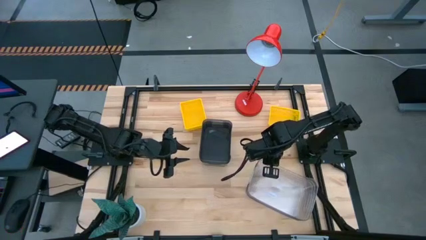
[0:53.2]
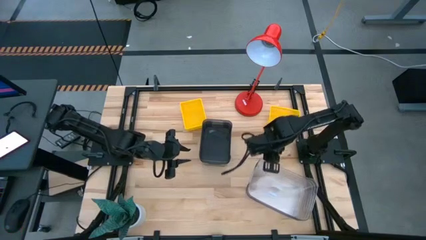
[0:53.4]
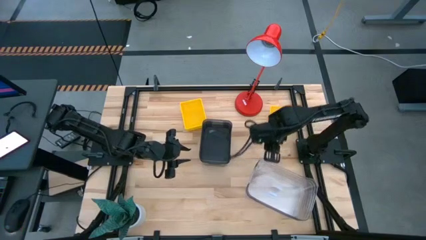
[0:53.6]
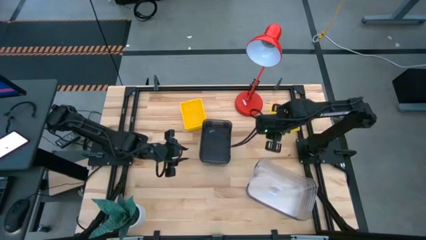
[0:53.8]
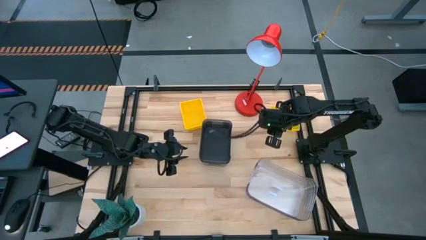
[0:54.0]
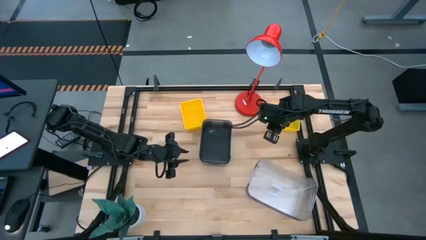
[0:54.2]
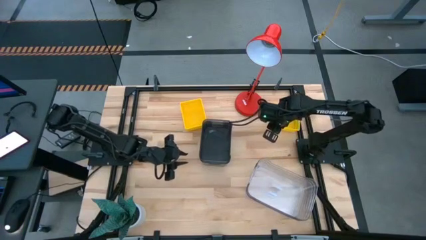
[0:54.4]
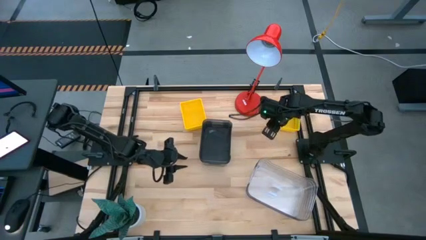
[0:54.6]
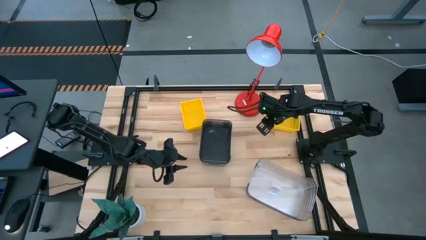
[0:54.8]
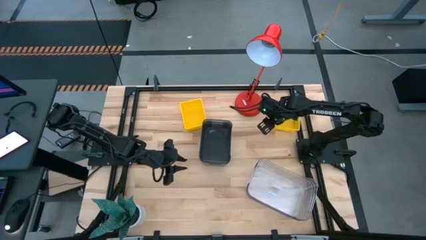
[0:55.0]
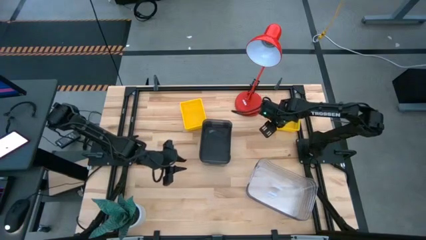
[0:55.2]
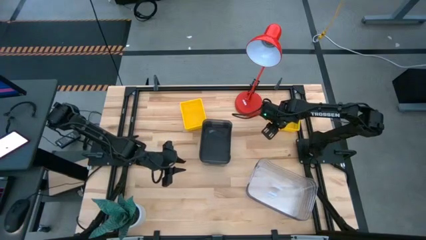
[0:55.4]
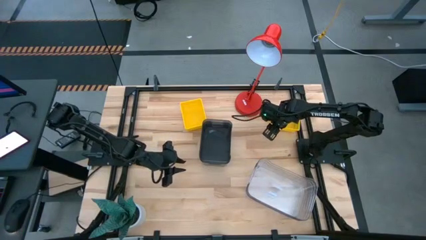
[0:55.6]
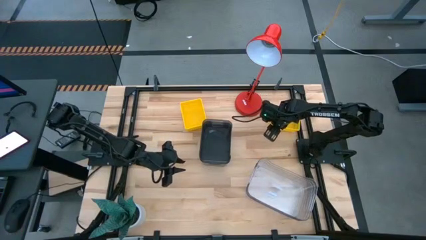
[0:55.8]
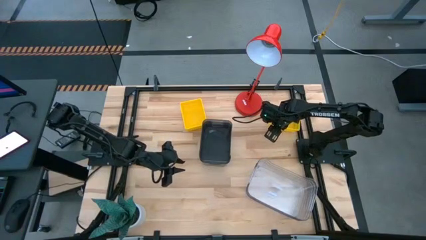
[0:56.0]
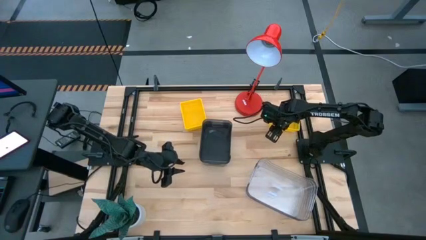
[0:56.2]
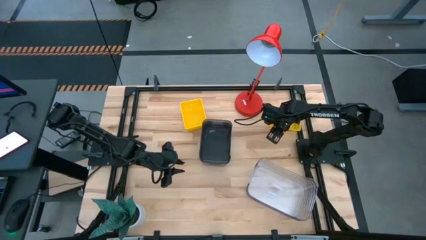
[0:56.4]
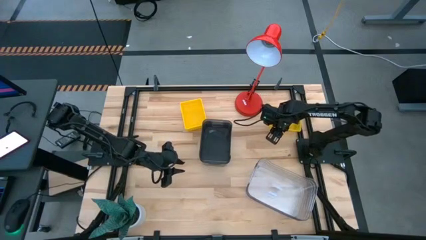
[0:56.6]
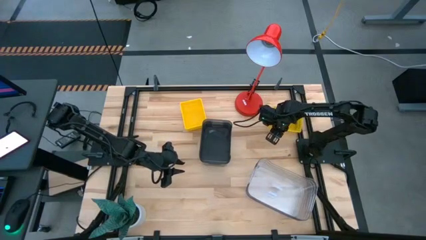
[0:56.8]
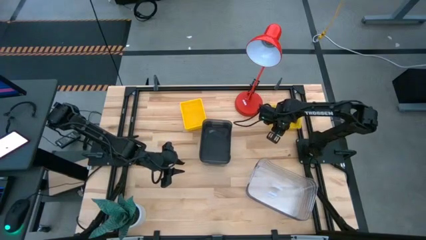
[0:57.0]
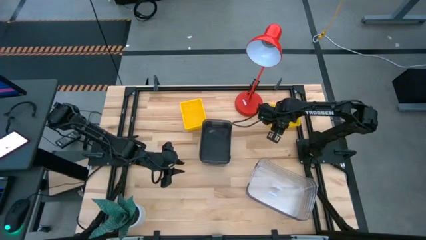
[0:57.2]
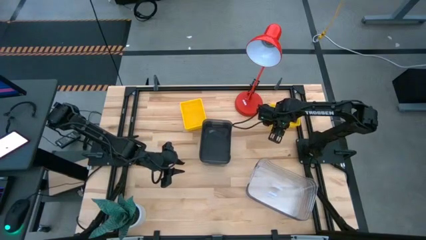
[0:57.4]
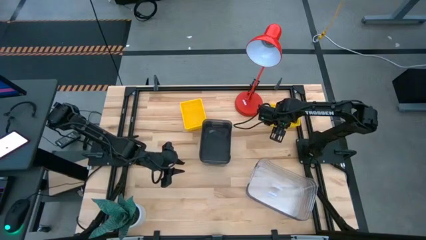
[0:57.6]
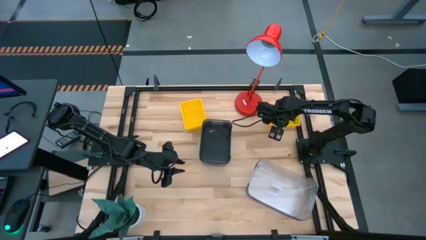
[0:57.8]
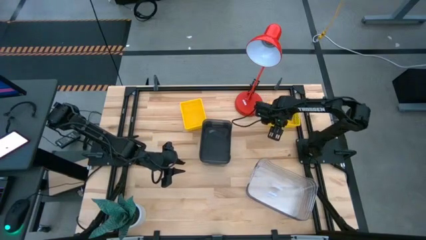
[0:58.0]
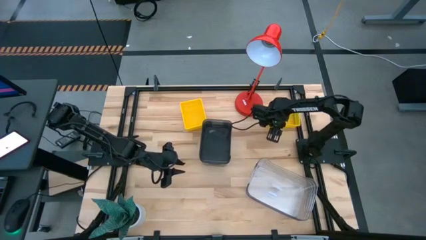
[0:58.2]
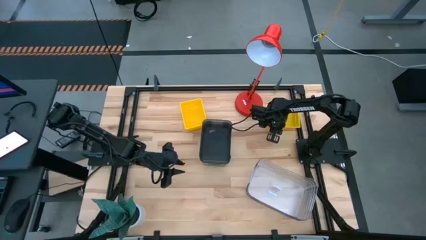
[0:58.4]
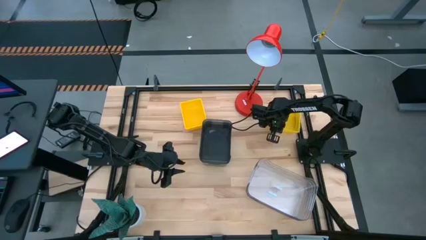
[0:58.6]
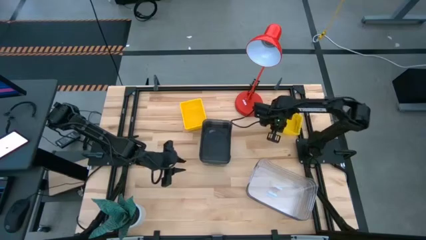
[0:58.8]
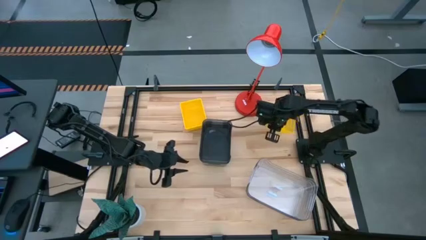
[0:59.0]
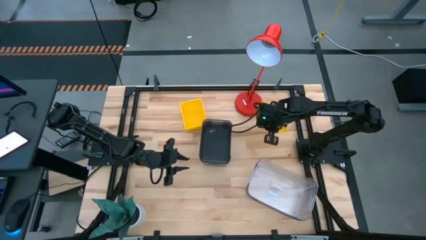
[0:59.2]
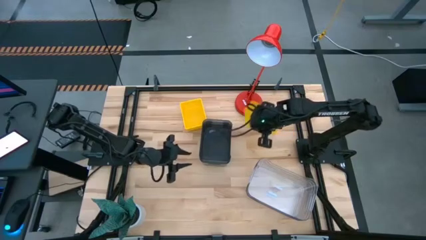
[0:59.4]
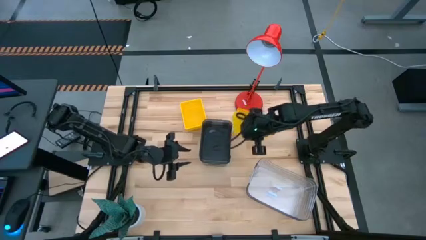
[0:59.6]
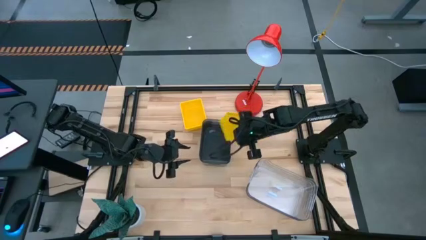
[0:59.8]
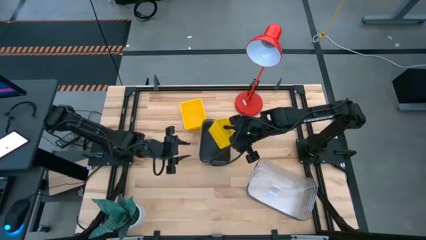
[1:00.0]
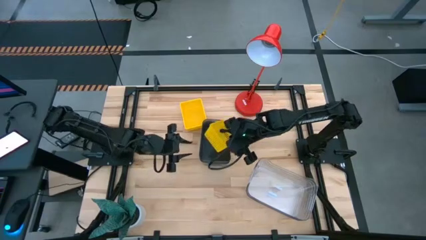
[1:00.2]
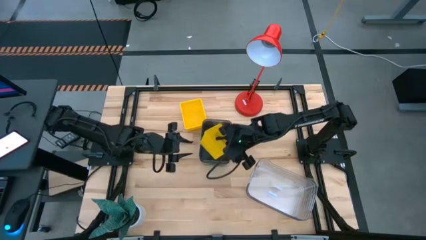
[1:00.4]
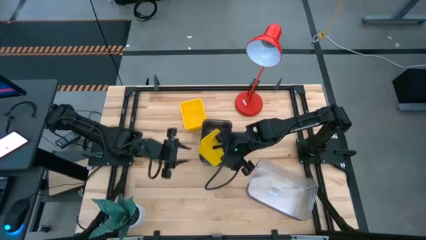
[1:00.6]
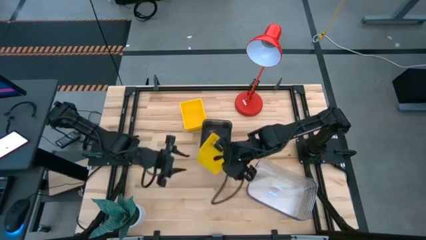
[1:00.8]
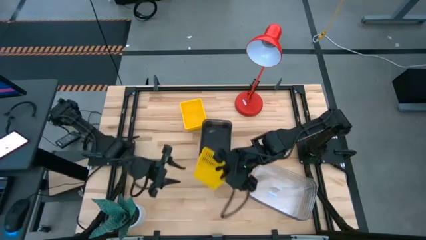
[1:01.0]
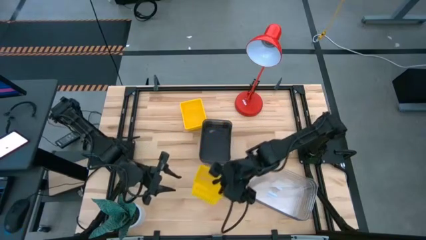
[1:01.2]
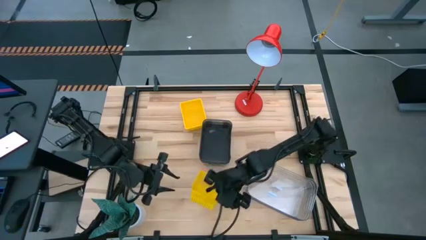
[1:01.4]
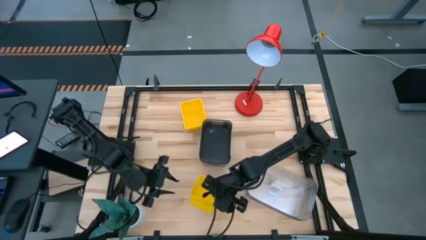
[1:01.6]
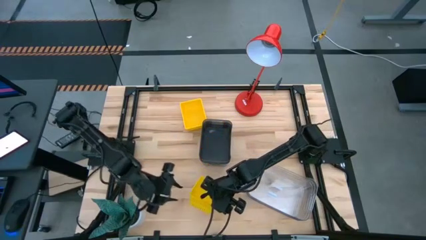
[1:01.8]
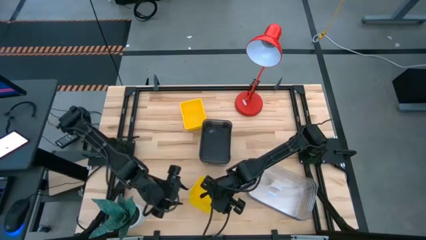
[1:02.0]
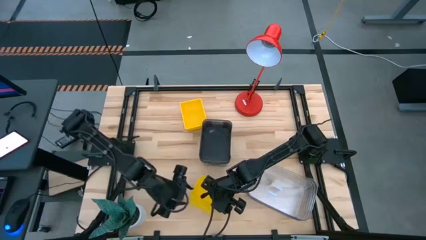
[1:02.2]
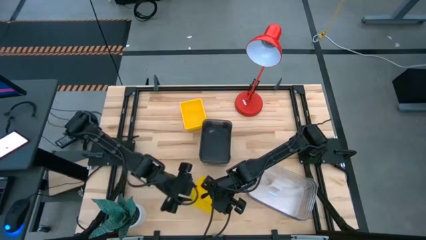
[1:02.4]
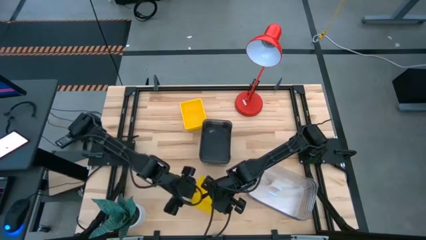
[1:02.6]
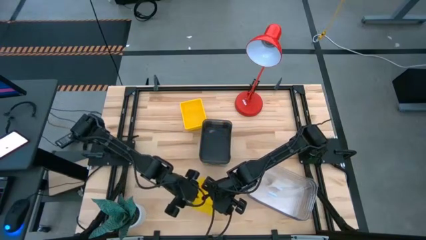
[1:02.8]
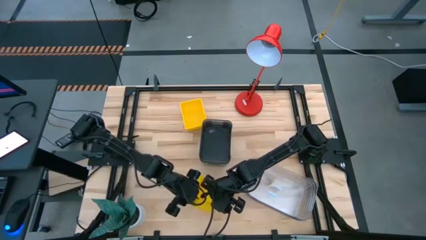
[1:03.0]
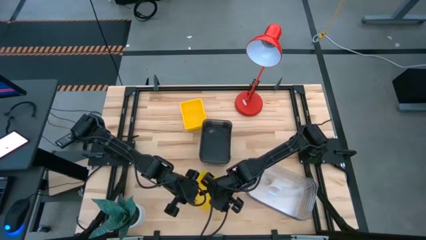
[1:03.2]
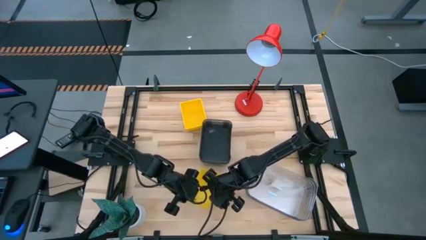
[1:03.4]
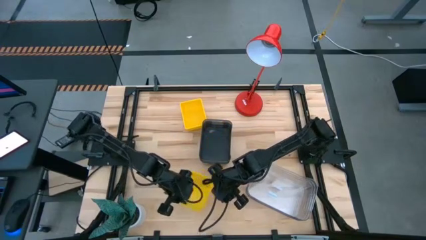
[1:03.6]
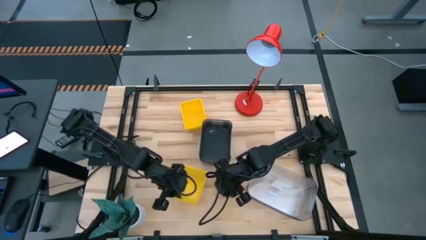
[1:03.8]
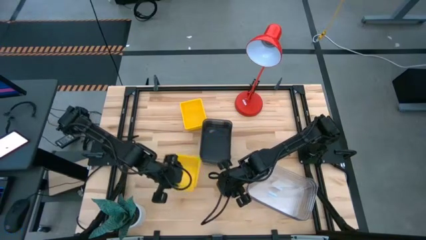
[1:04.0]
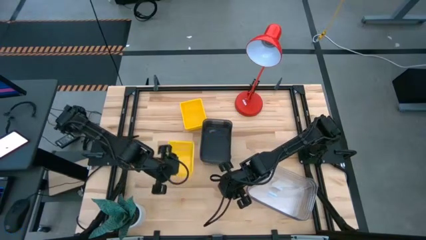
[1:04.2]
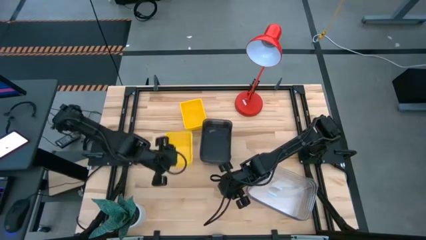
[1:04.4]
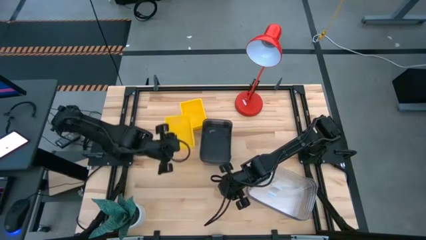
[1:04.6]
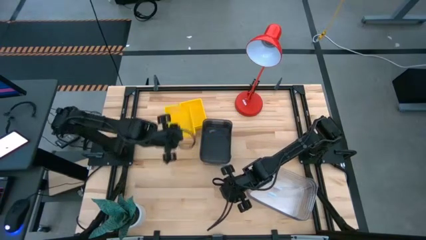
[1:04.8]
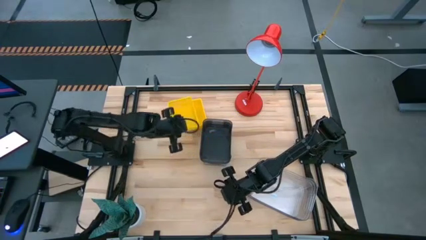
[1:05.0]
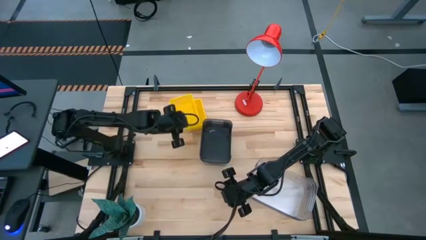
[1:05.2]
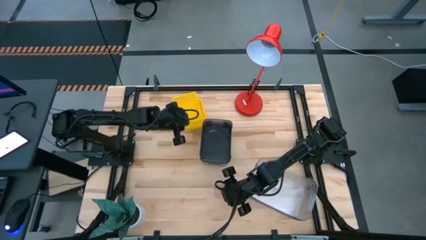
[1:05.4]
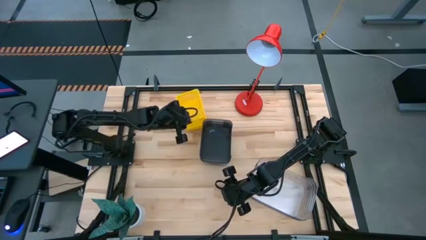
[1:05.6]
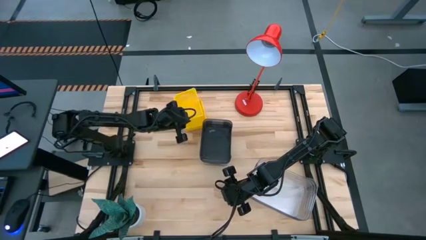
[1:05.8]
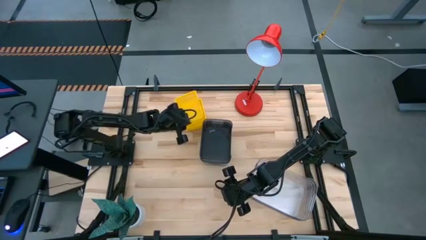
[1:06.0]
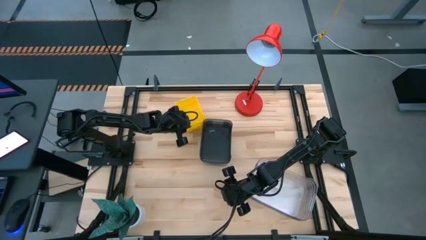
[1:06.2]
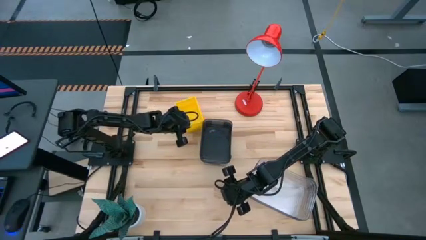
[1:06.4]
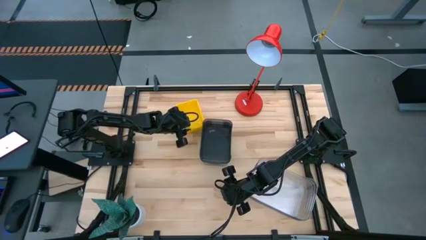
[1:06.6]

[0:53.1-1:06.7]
Stack the right yellow bin on the yellow bin
